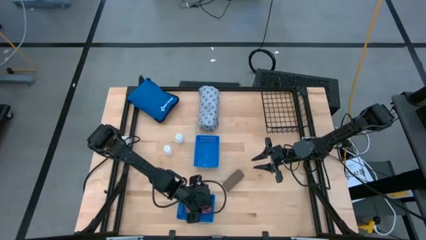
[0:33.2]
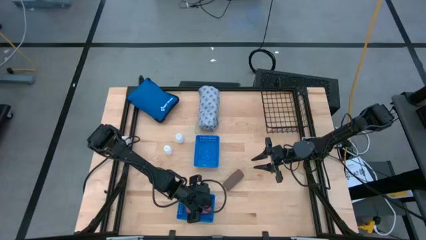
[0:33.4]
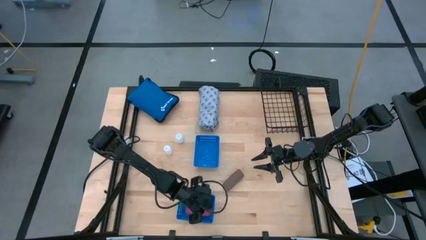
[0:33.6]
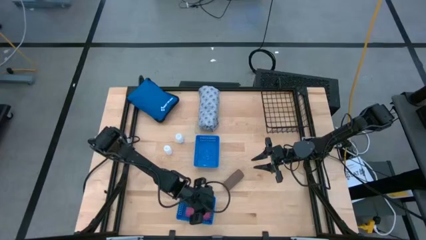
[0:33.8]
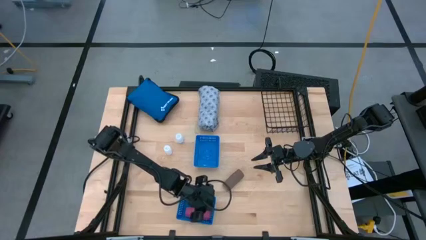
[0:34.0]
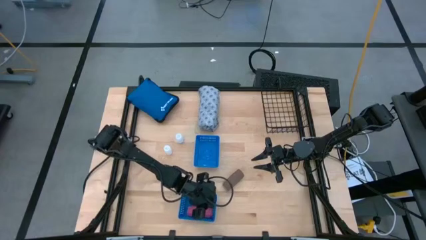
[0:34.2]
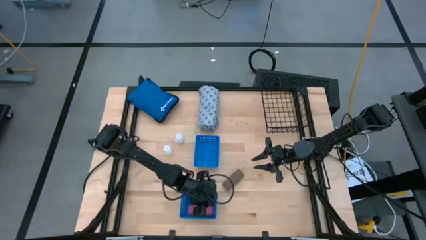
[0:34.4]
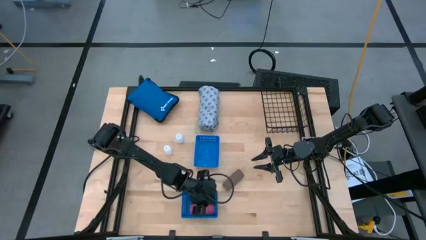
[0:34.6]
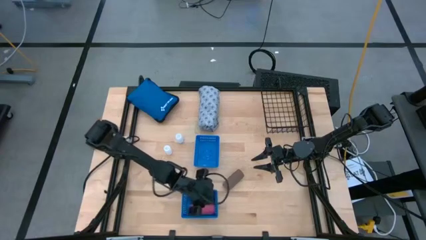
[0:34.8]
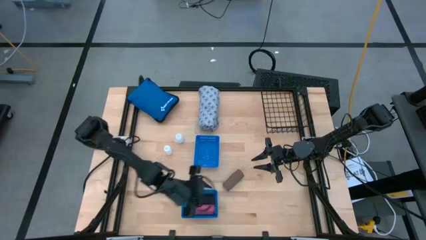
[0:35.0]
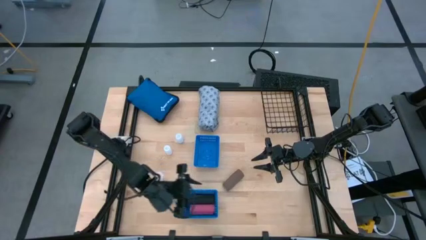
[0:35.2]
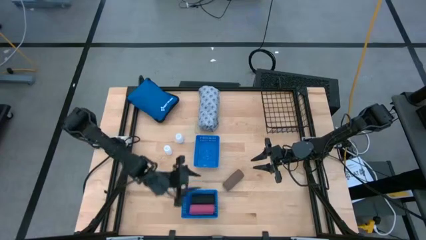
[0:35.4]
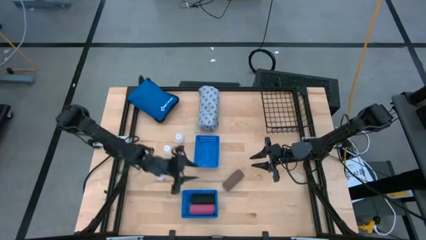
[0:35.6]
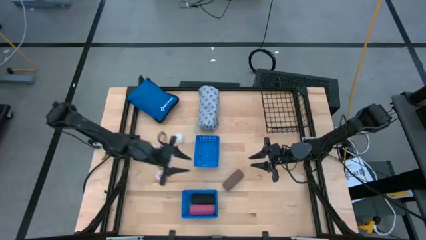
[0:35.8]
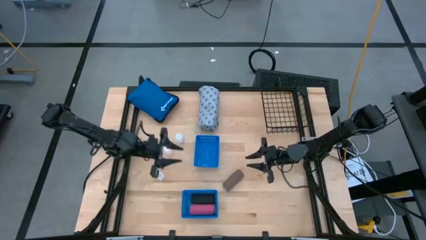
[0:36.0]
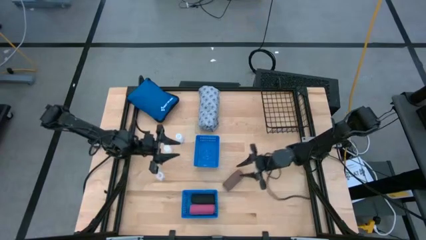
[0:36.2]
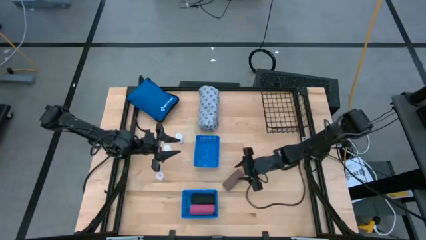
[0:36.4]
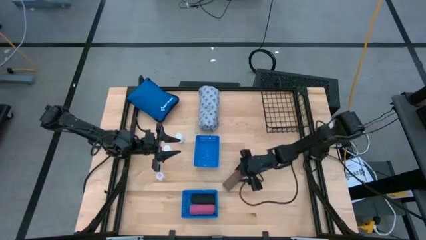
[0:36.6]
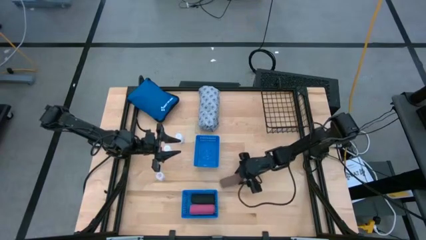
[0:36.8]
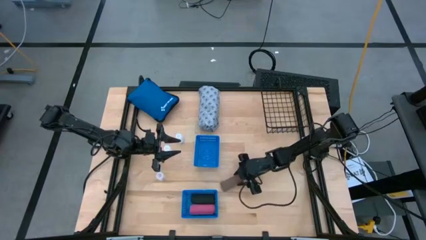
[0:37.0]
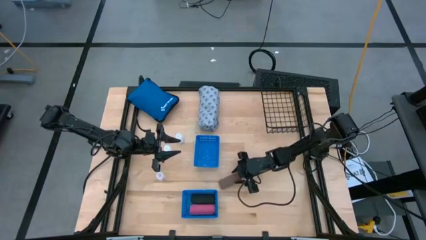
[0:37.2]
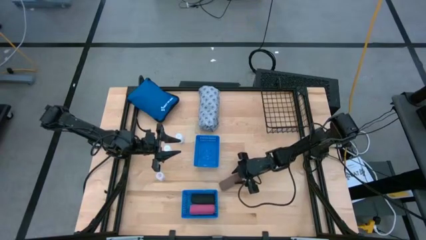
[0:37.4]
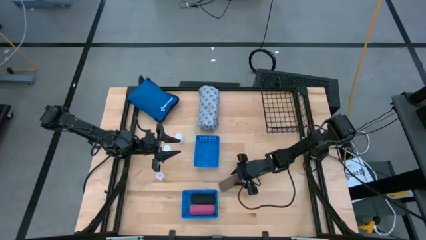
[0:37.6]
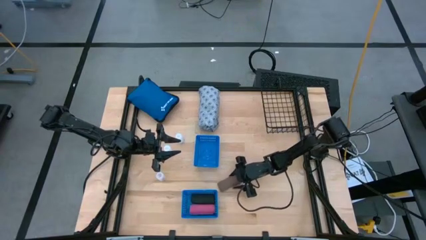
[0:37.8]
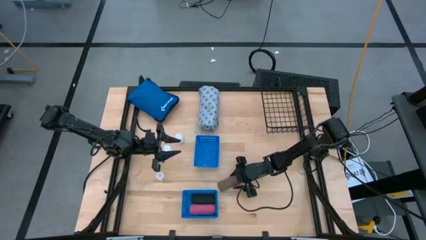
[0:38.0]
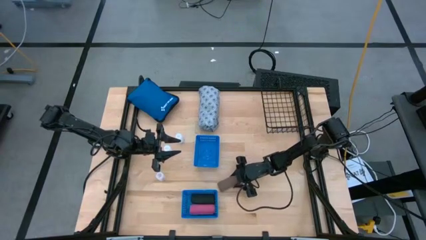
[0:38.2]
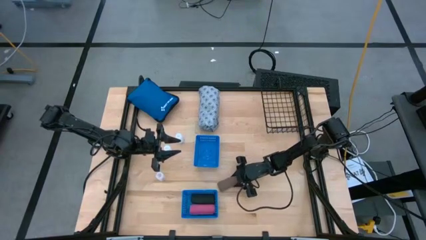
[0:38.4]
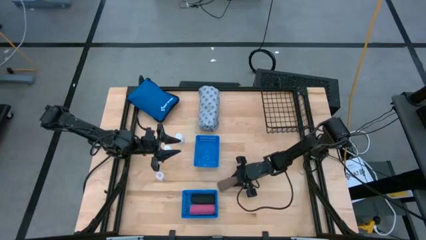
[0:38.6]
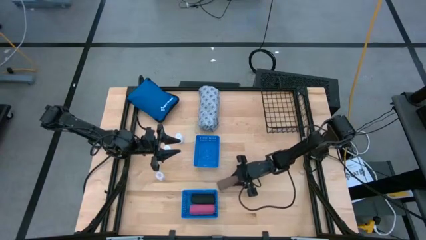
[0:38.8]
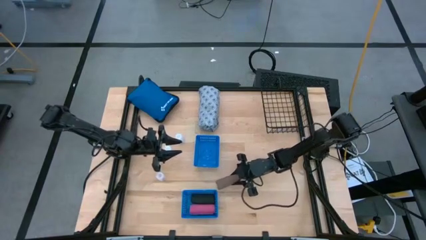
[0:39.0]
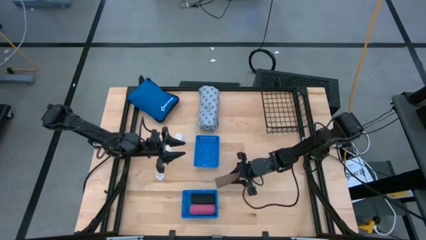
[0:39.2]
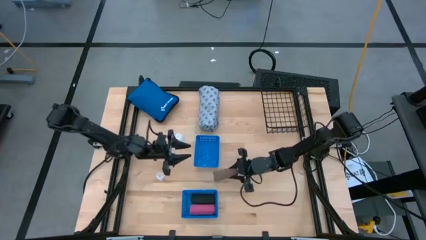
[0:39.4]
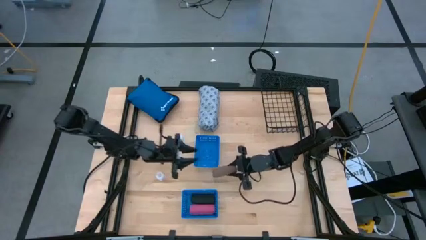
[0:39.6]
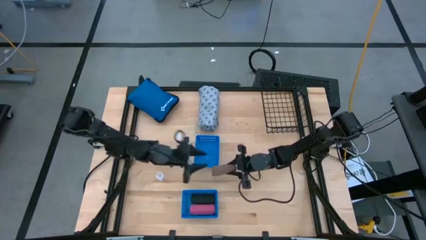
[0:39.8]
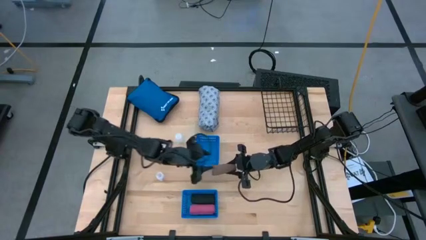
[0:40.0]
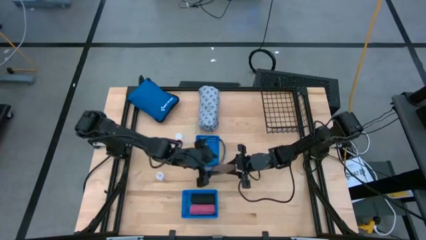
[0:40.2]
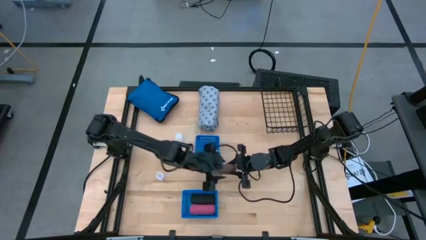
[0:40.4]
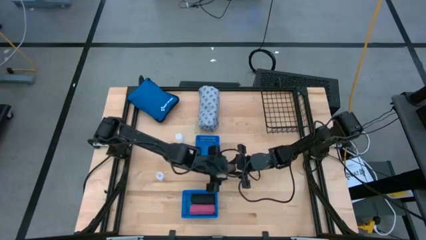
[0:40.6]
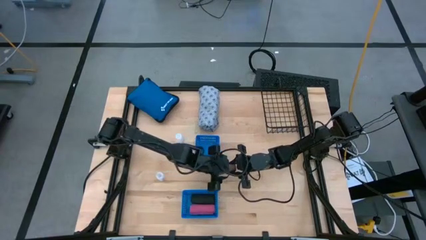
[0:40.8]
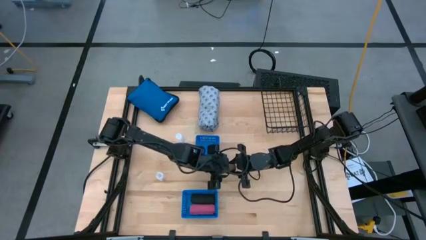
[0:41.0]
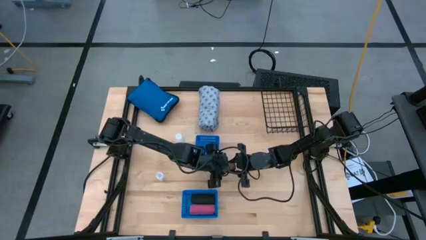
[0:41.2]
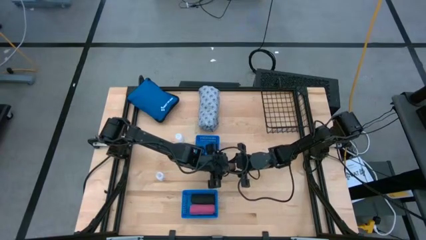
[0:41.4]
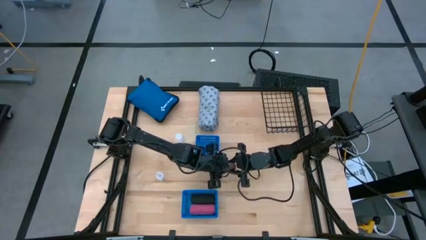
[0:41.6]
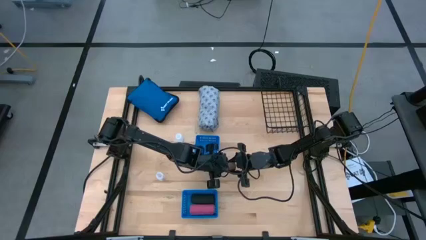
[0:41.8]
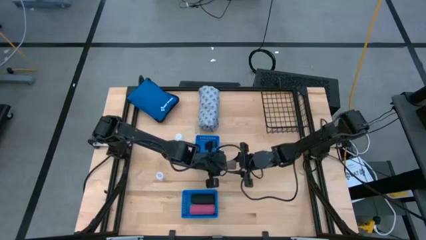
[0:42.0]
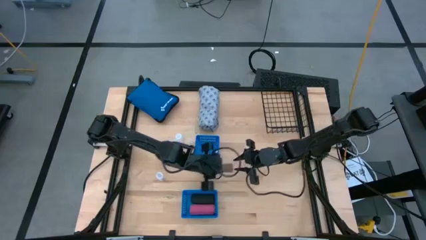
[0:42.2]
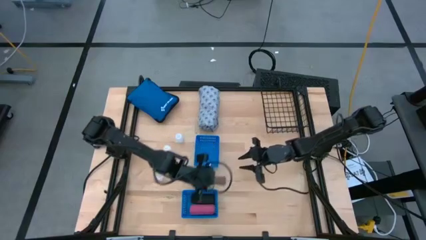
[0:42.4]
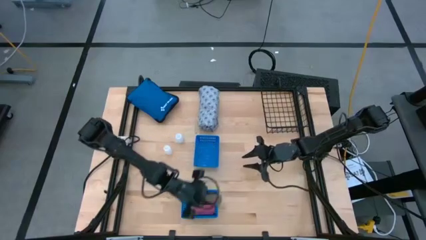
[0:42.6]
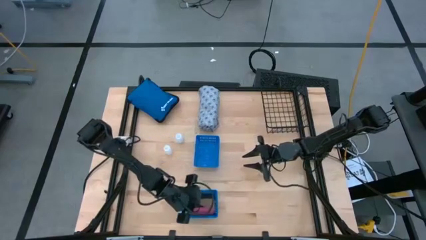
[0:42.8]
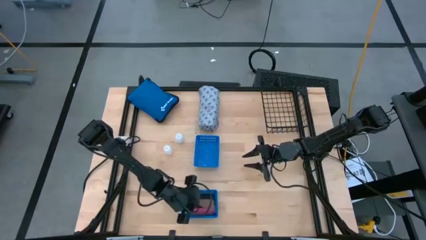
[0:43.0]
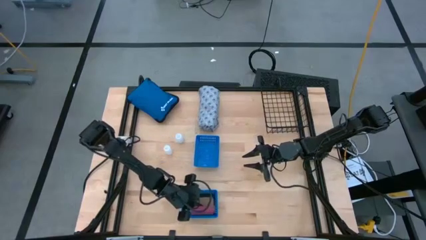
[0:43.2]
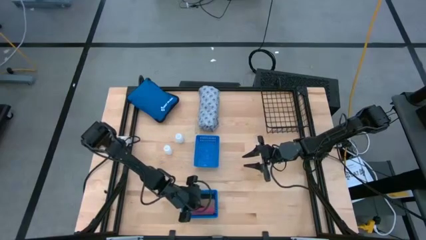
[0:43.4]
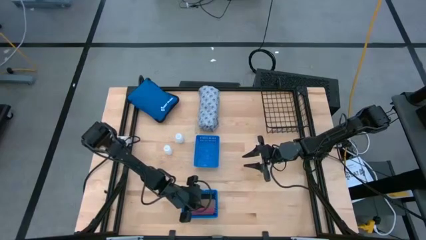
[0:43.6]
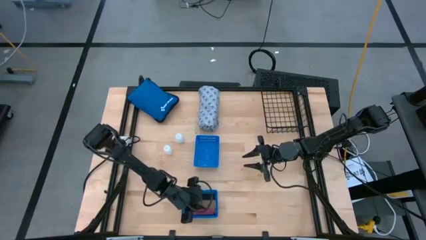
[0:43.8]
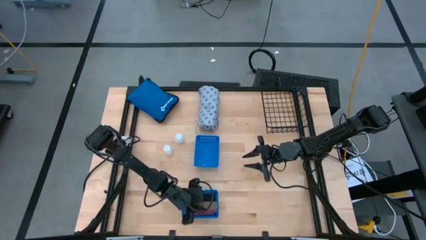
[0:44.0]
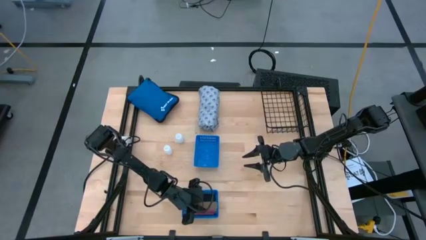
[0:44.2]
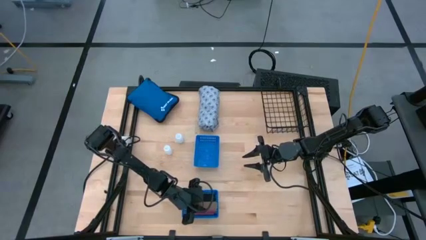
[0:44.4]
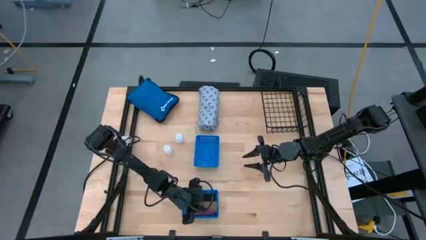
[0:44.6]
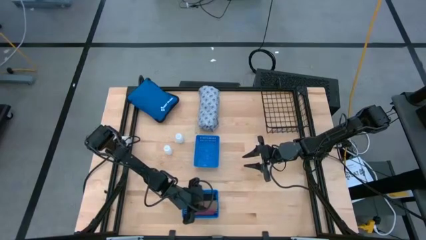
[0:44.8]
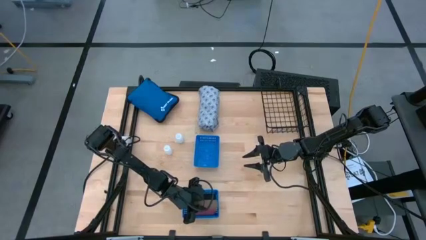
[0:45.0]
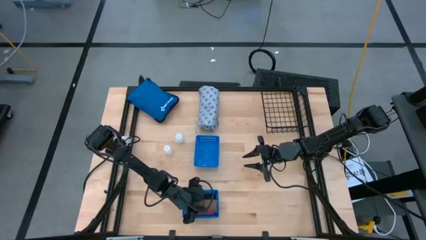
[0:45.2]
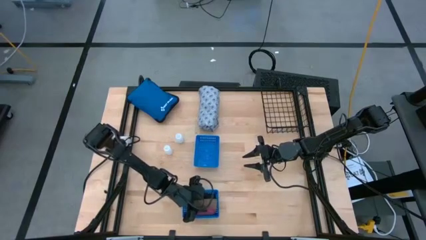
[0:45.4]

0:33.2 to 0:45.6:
Task: Pick & place medical supplies in basket/bin
Put the brown bandage into the bottom blue basket

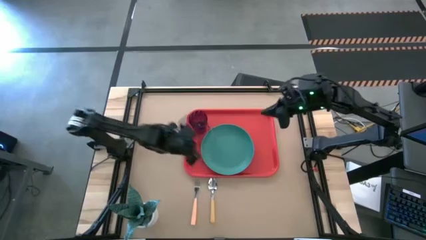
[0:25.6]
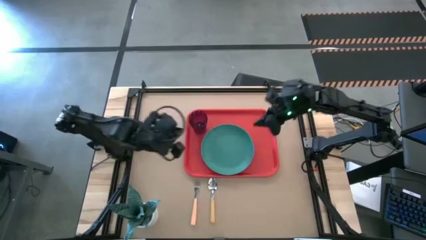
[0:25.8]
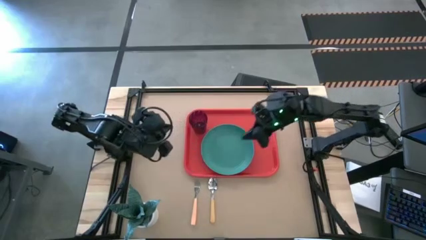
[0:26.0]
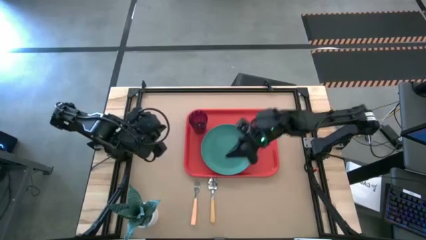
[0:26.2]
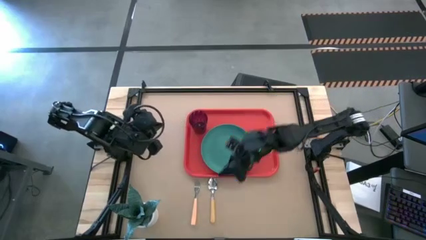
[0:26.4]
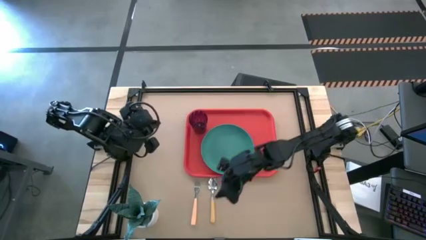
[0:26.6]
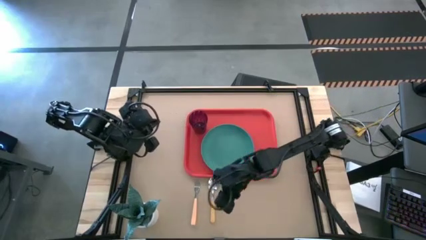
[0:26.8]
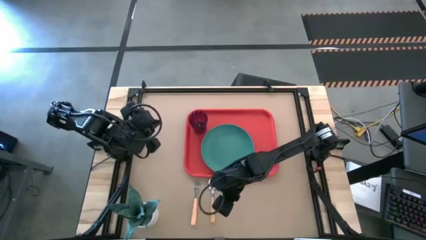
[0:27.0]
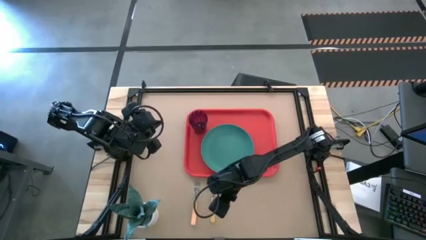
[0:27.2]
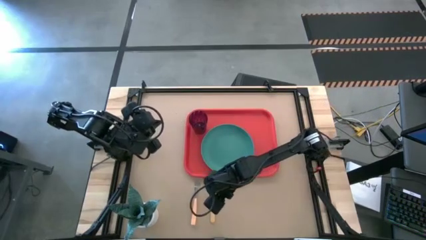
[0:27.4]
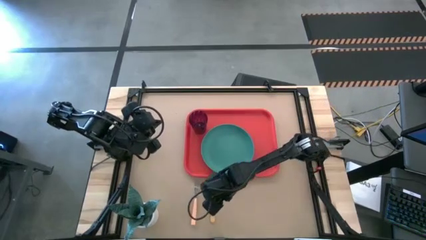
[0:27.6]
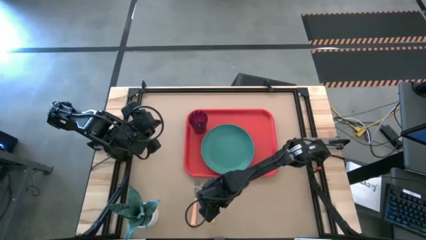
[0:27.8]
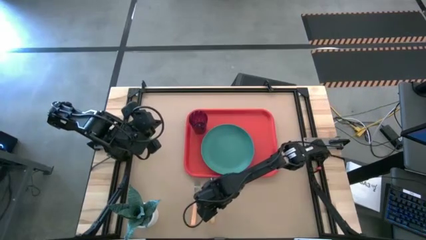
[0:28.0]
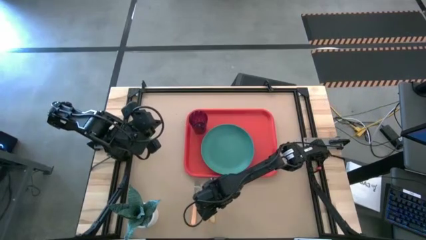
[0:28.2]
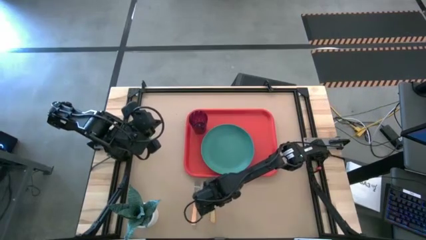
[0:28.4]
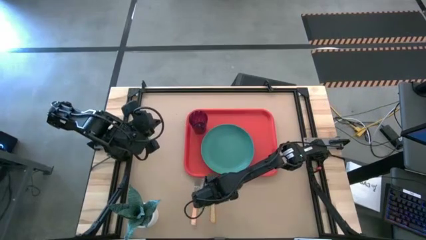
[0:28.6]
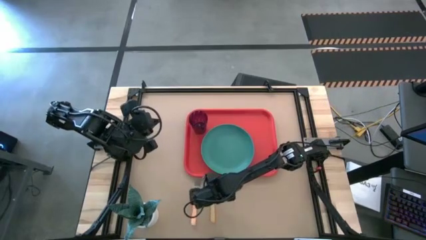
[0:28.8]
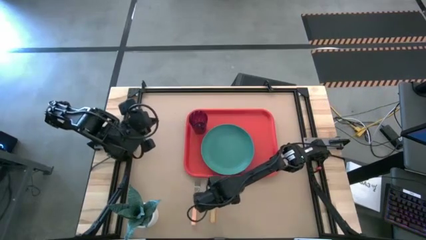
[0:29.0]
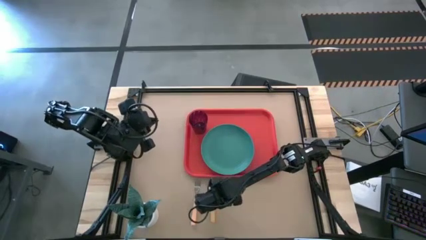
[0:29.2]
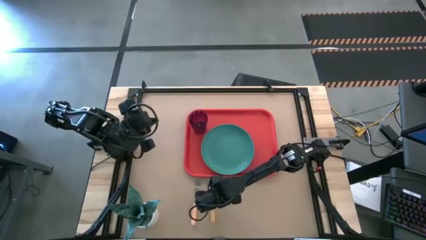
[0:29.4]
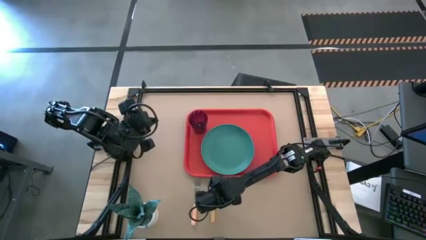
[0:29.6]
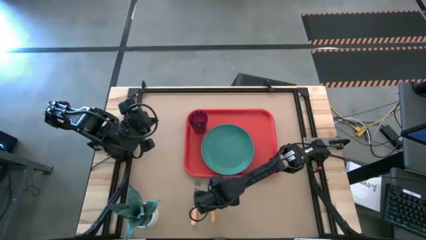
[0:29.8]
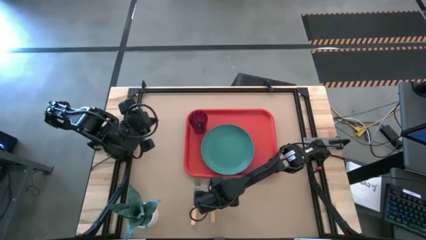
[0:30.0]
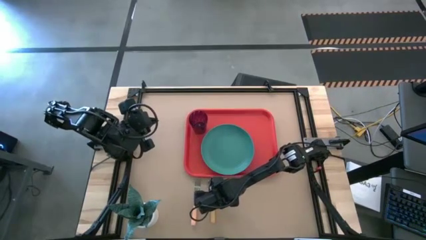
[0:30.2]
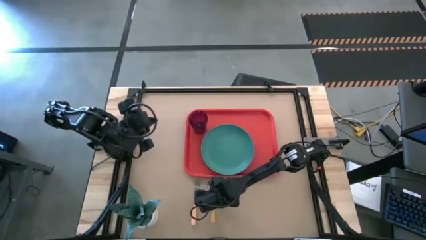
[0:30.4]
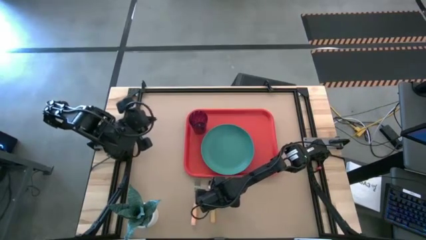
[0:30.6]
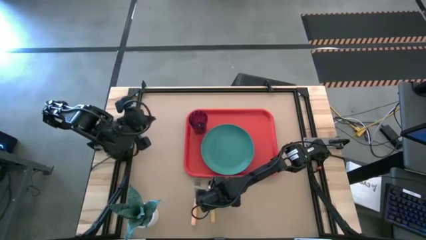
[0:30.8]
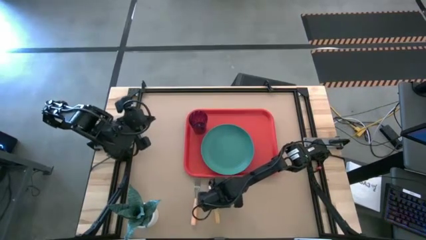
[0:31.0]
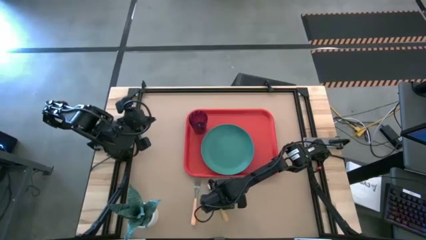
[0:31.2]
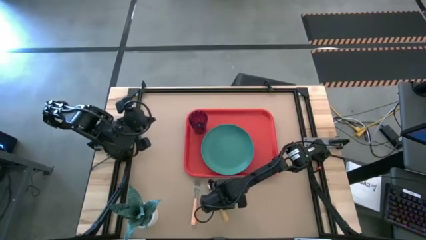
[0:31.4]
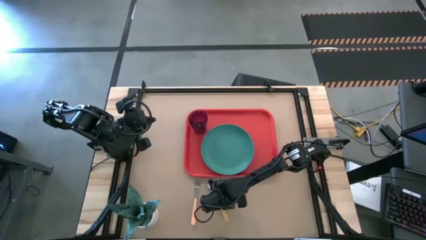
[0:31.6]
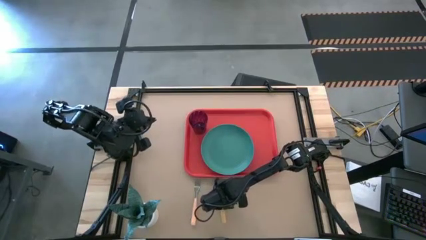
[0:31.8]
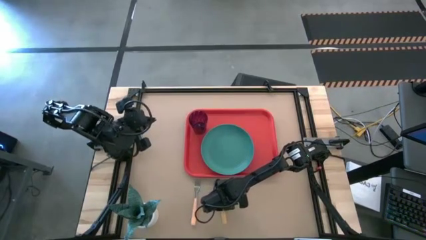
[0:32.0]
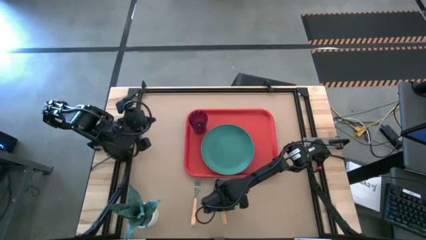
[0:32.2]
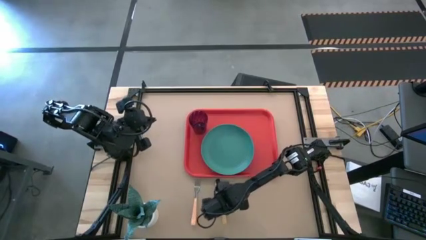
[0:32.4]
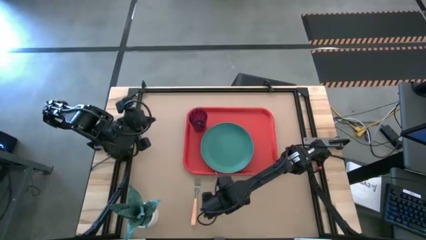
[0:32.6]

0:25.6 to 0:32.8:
Task: Pick and place plate/cup/fork/spoon on tray
Put the yellow spoon beside the green plate on the red tray
